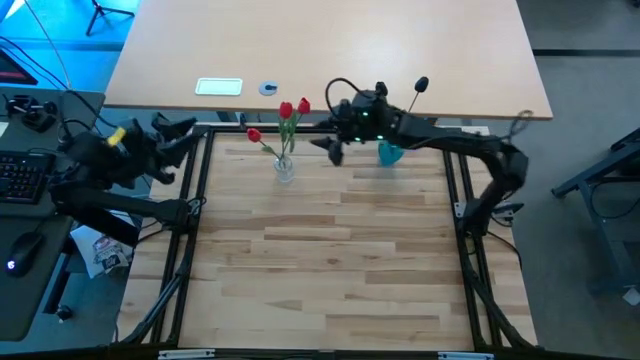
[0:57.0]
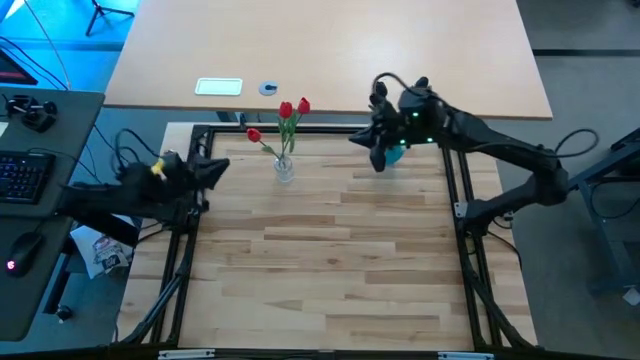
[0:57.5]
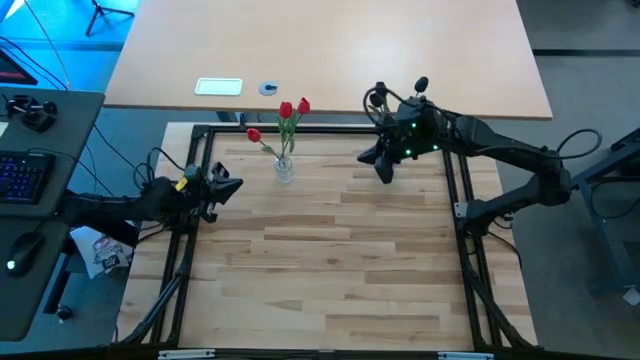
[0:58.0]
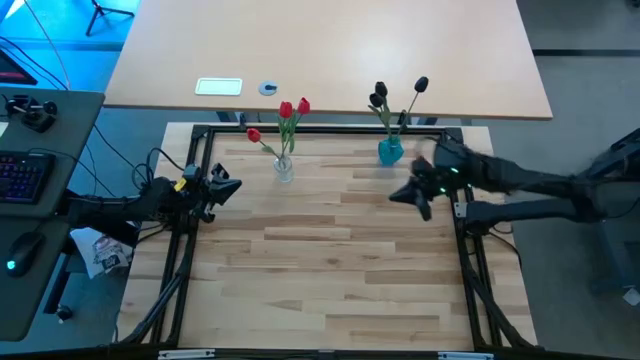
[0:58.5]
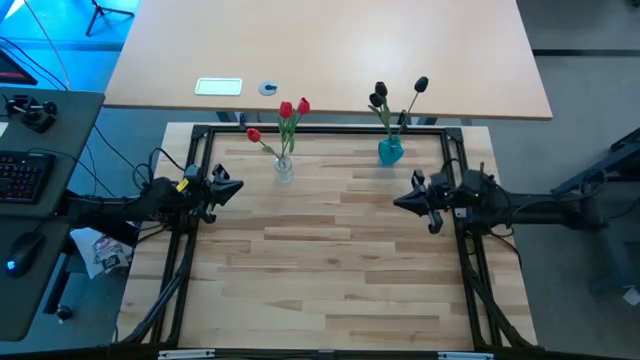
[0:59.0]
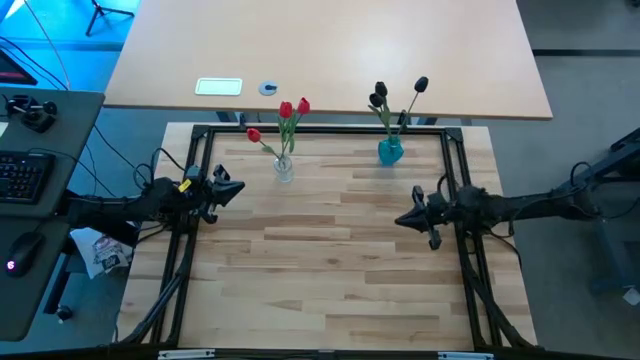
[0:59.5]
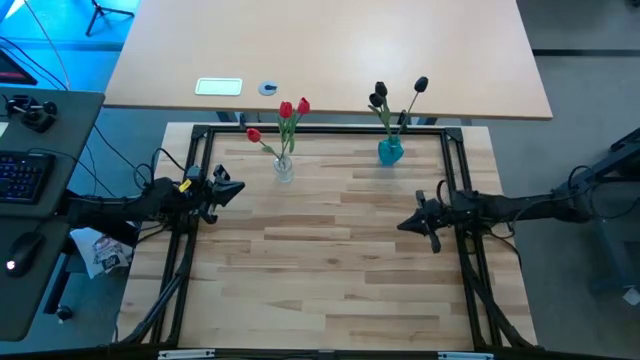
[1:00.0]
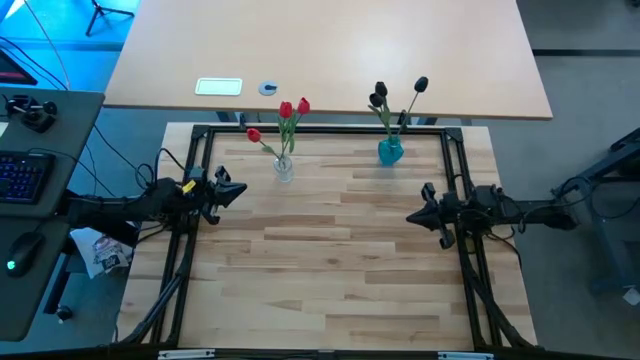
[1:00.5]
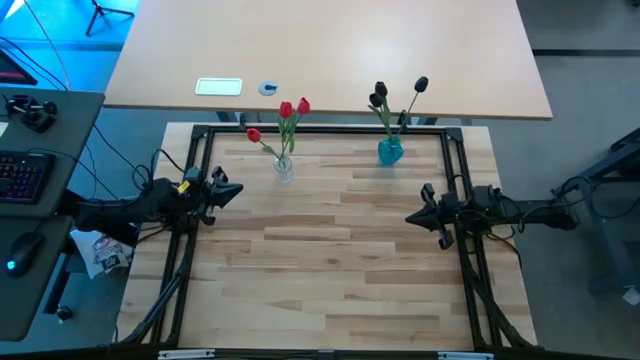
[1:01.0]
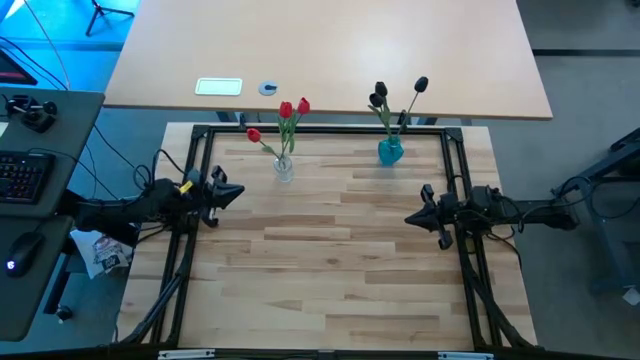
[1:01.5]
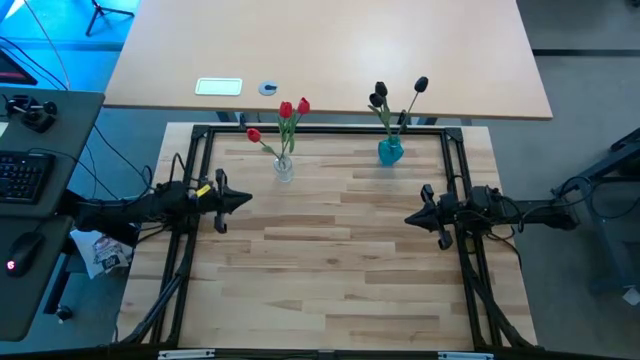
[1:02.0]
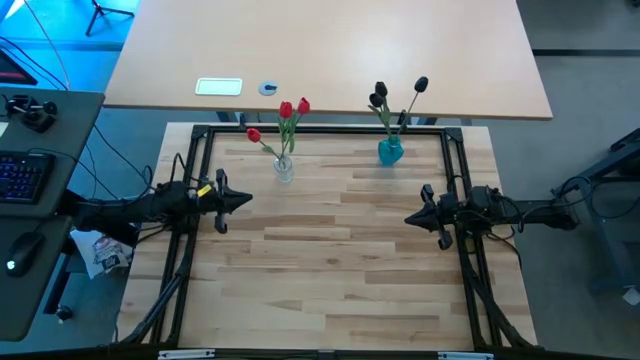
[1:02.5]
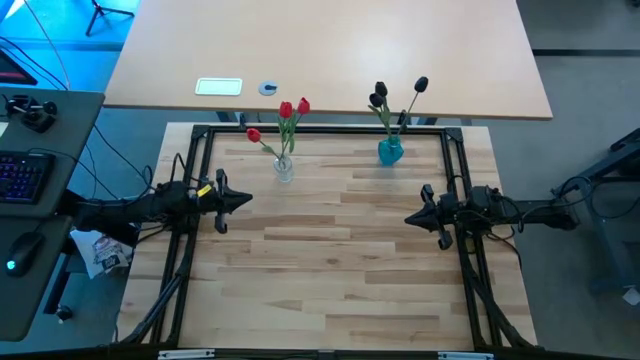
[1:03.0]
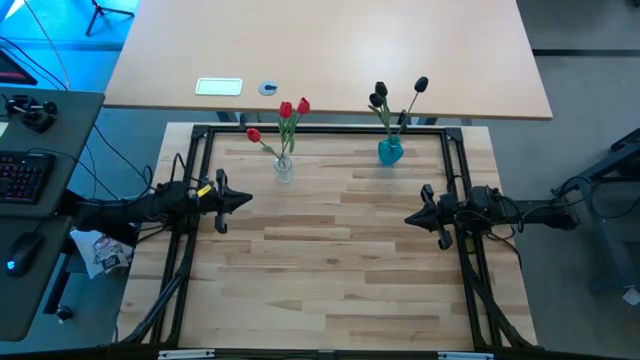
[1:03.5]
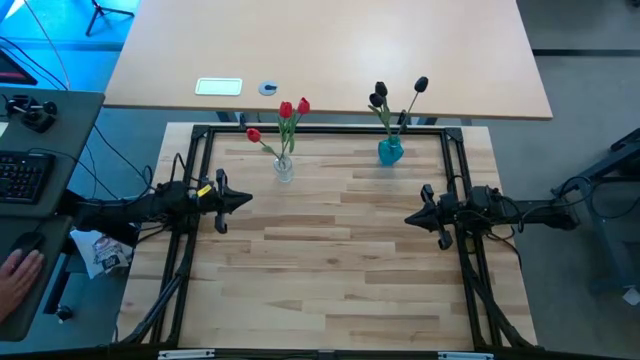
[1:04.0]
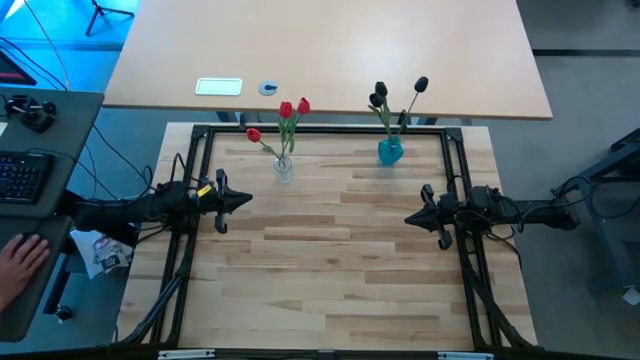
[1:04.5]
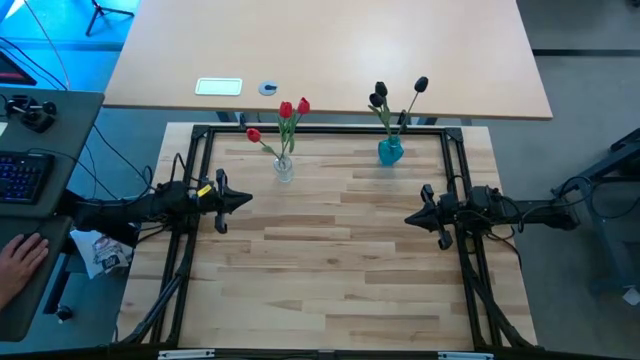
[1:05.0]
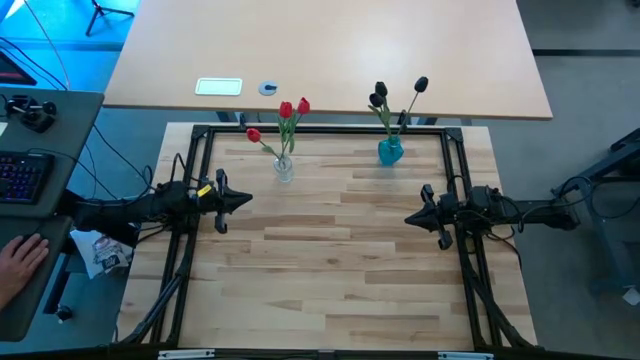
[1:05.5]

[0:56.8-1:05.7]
Task: Sort flowers into vase by color
Return to Home Position

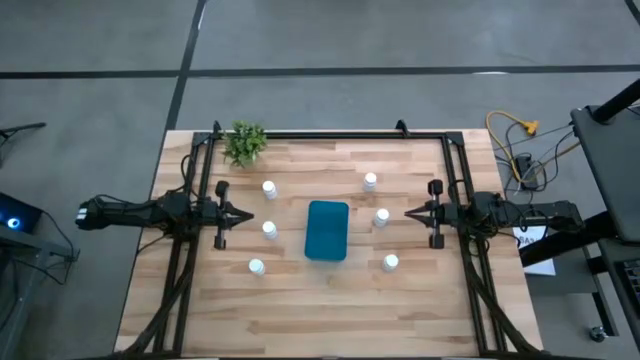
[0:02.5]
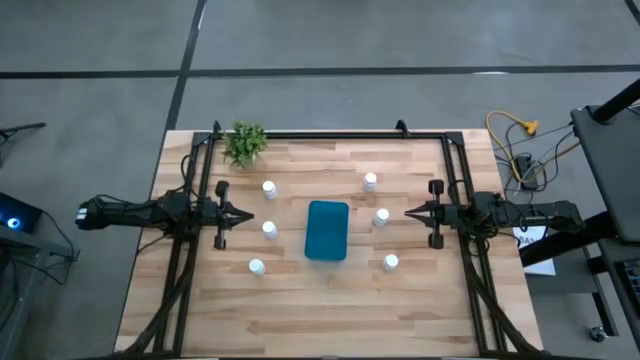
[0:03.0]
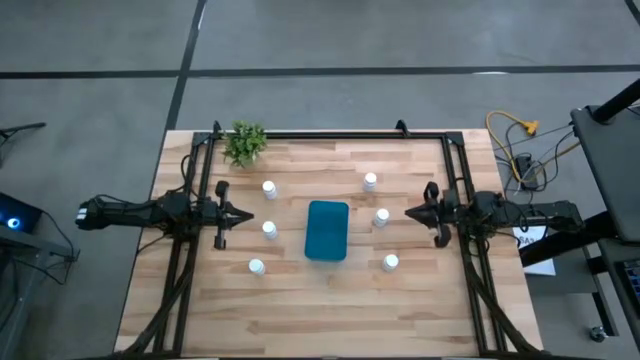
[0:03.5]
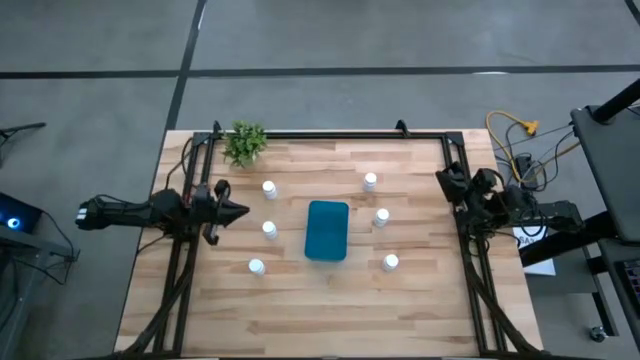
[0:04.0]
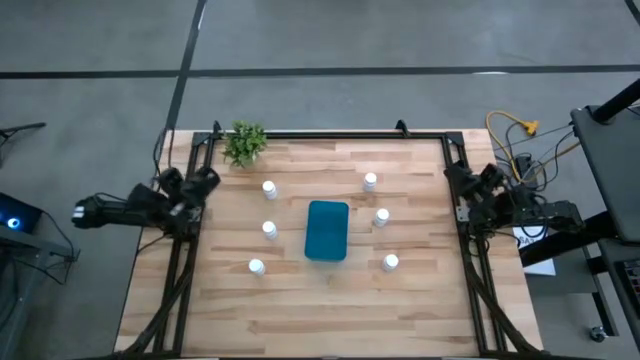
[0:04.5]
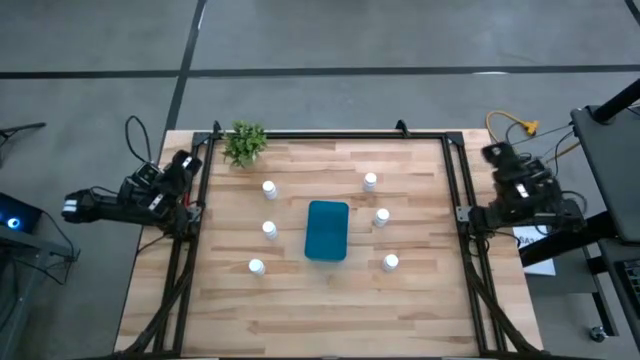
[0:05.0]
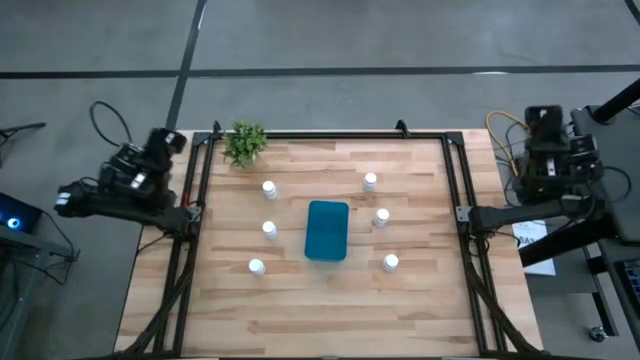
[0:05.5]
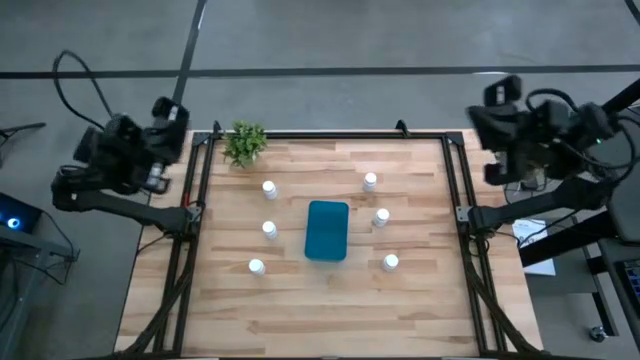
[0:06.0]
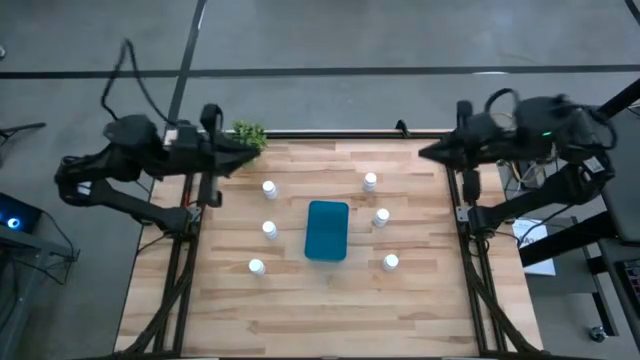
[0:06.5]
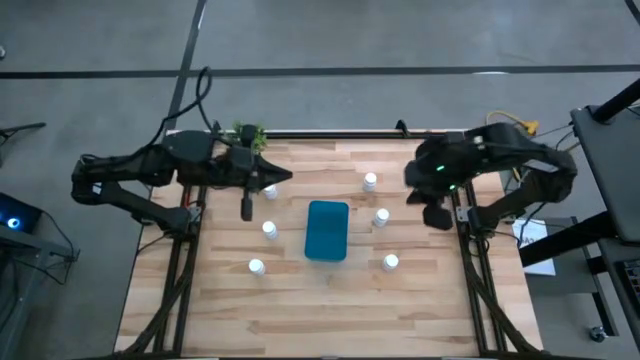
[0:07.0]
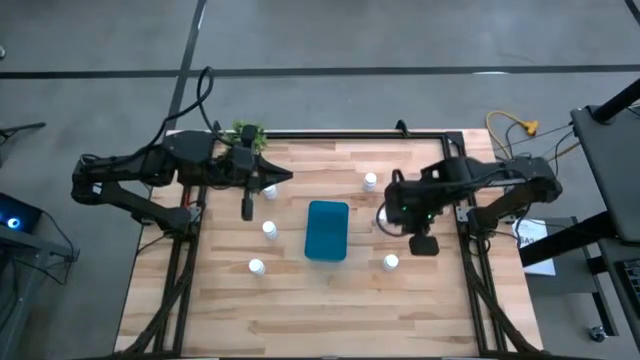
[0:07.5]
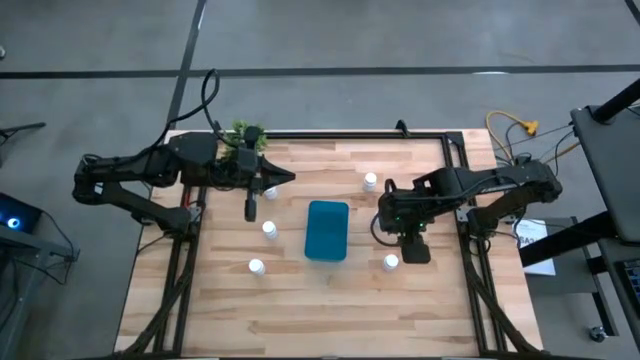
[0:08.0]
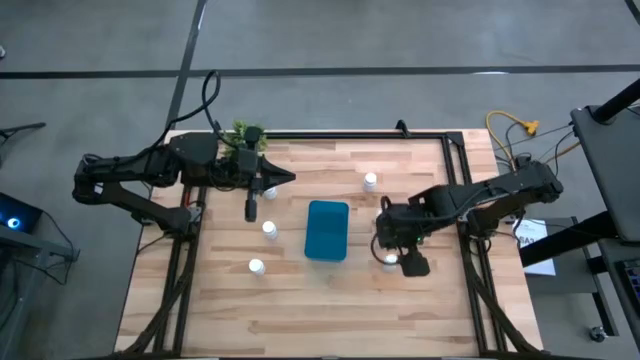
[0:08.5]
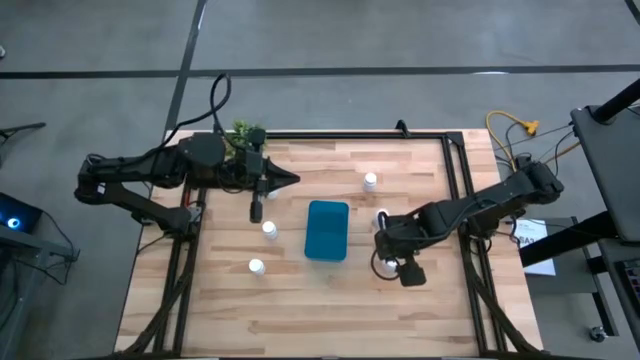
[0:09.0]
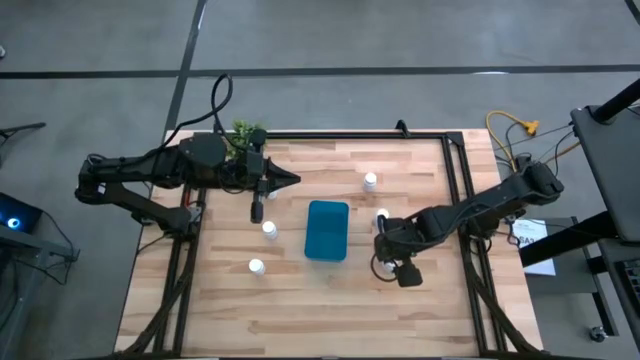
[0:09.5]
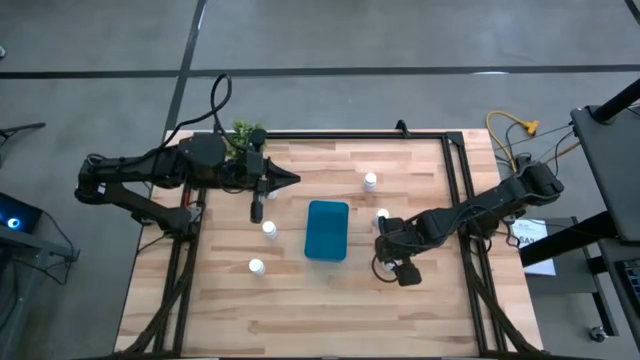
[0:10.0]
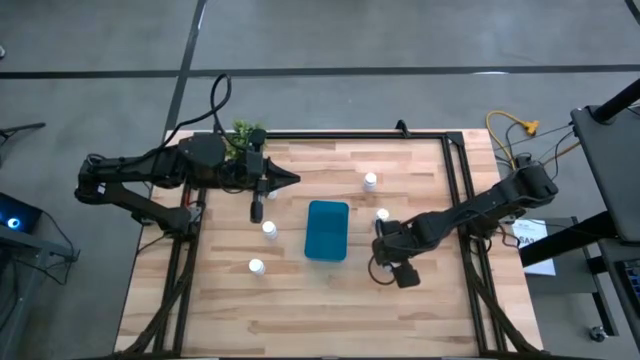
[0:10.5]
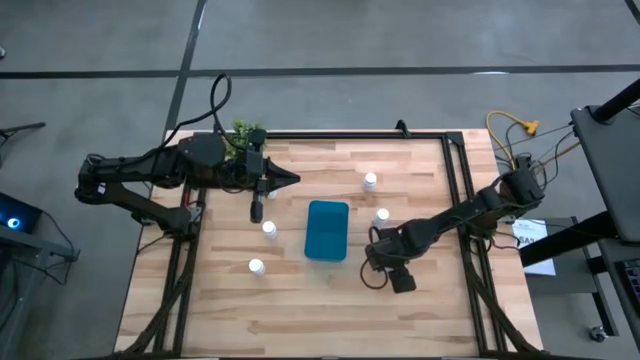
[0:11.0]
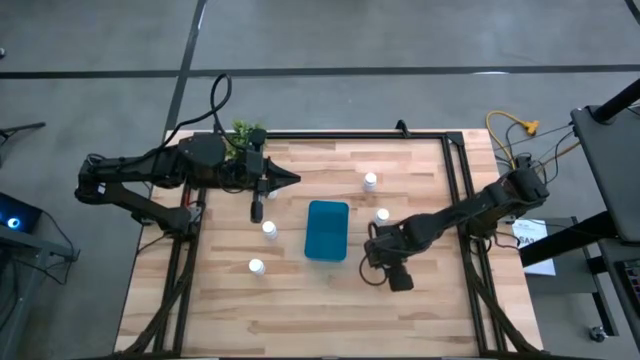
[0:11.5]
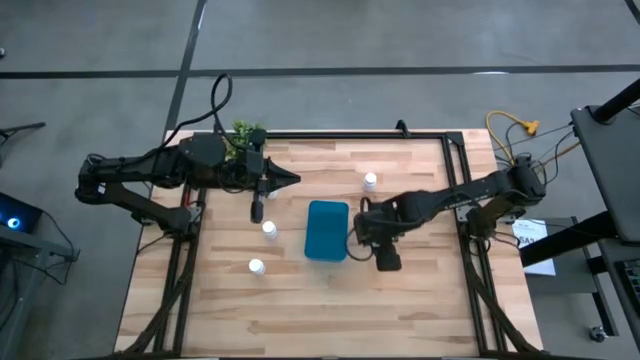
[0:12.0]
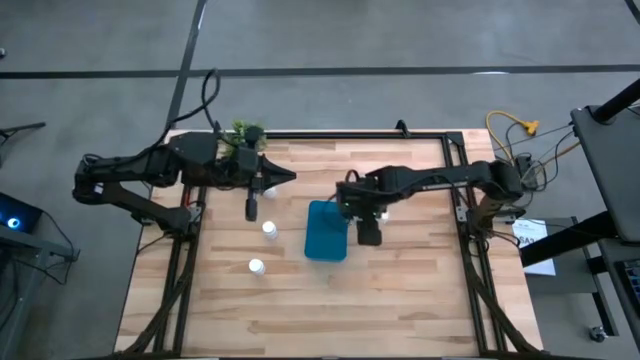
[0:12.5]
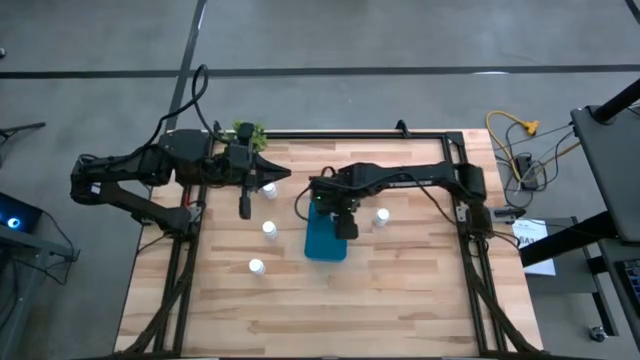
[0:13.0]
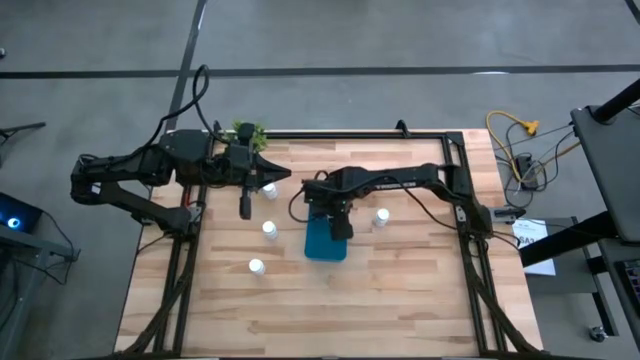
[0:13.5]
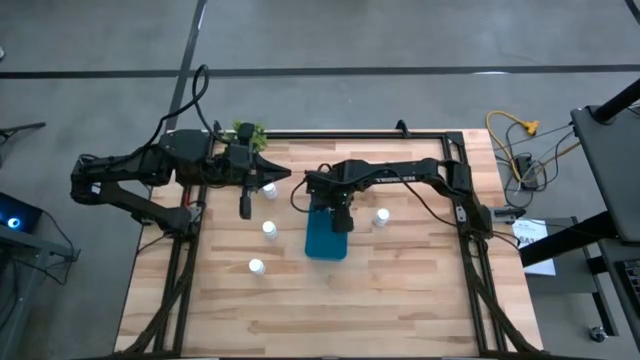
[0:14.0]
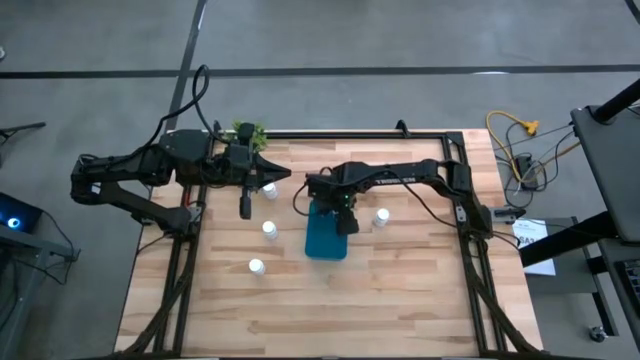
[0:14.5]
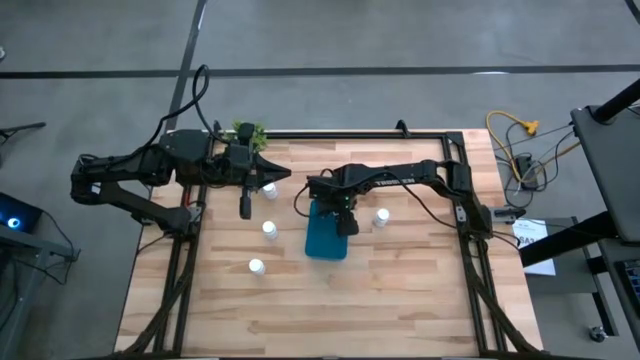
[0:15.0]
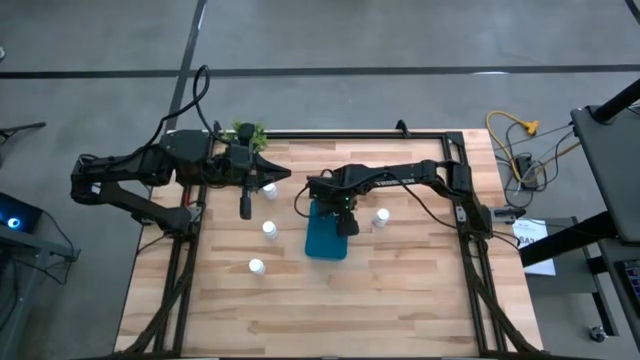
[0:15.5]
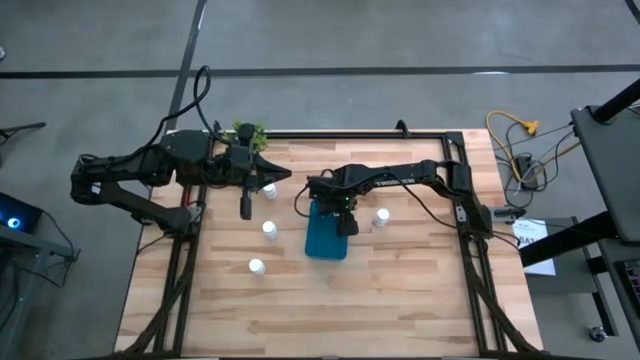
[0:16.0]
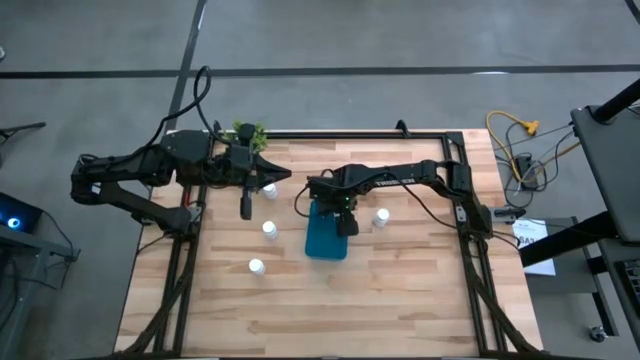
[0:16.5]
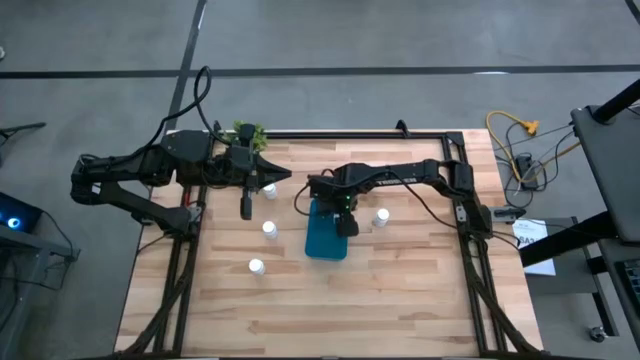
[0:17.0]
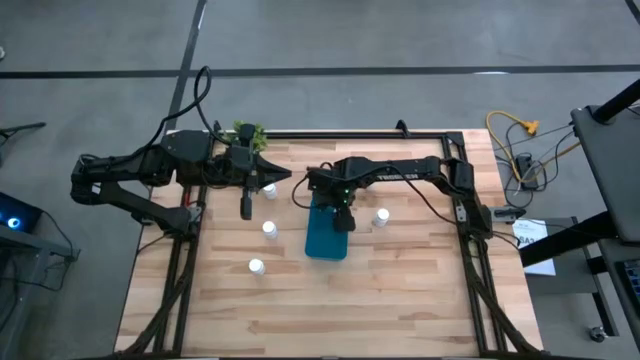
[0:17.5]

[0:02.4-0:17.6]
Task: Pick and place pill bottles into a basket
Put the white pill bottle into the blue container
